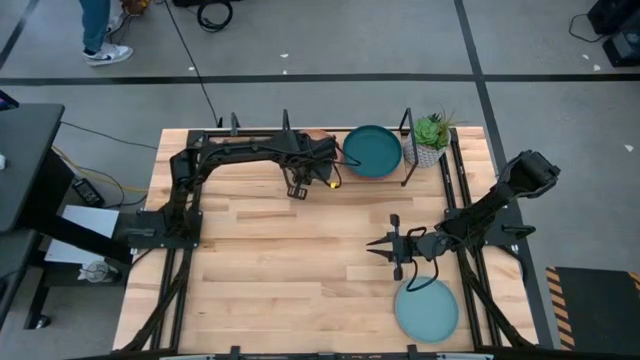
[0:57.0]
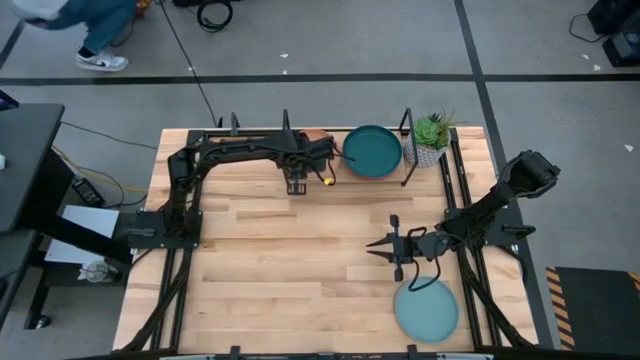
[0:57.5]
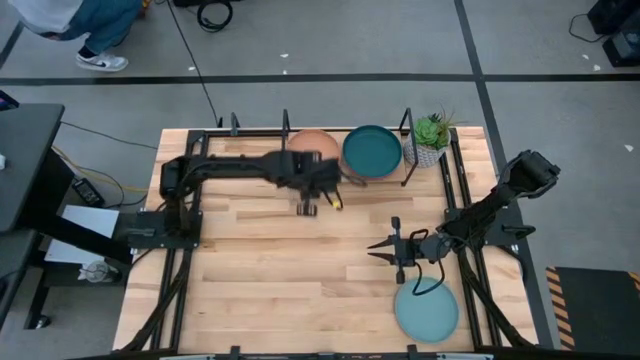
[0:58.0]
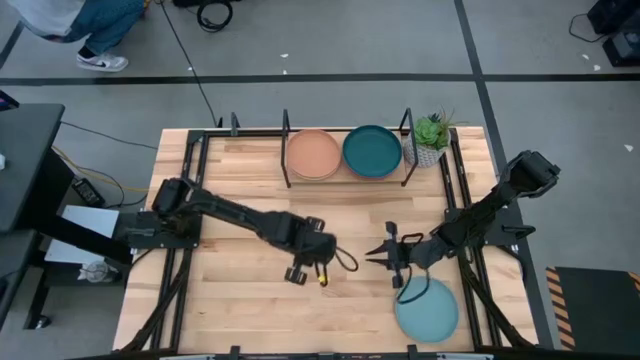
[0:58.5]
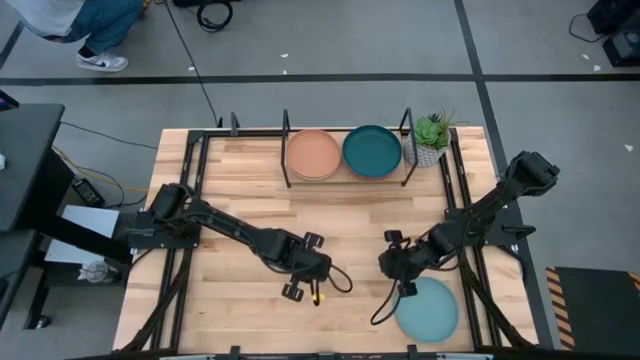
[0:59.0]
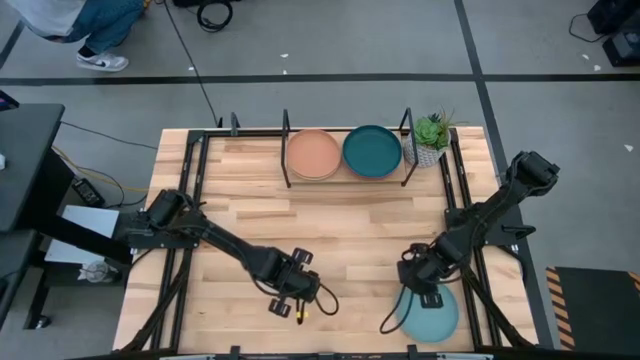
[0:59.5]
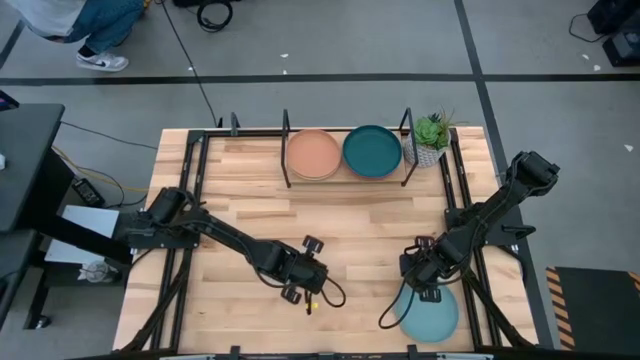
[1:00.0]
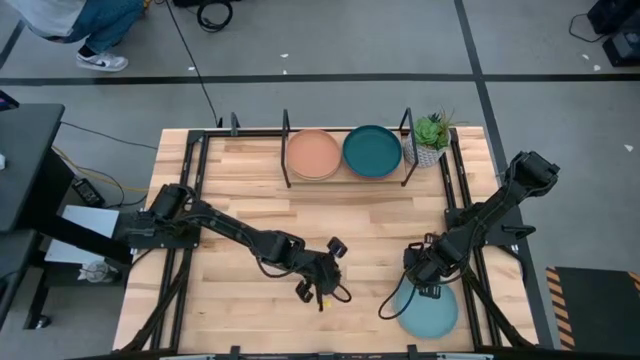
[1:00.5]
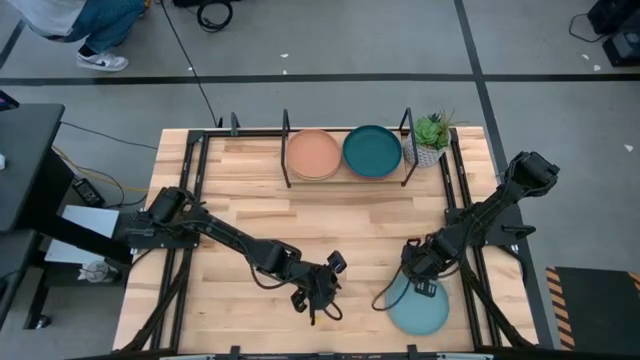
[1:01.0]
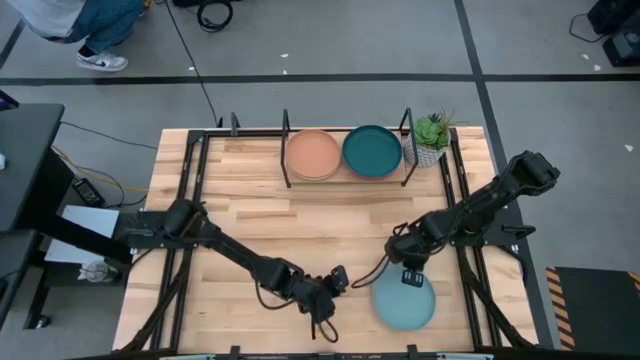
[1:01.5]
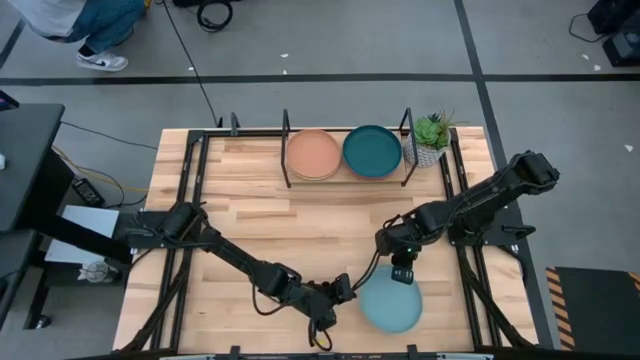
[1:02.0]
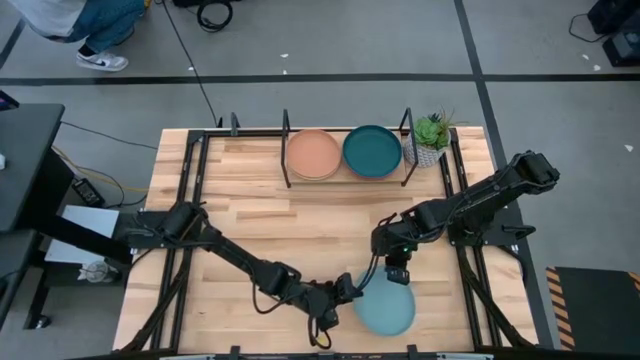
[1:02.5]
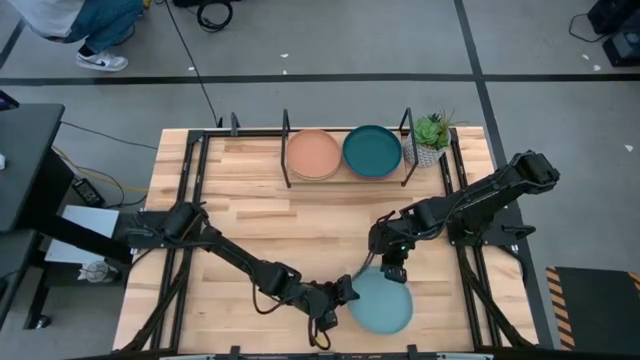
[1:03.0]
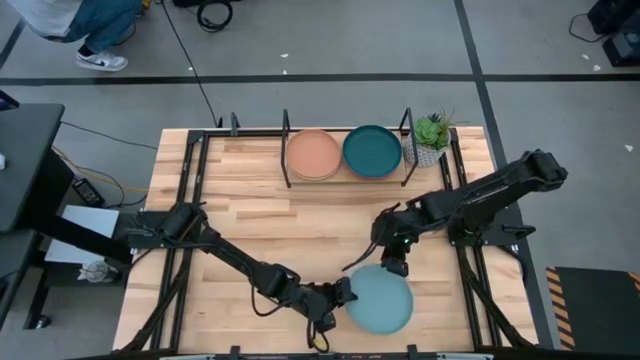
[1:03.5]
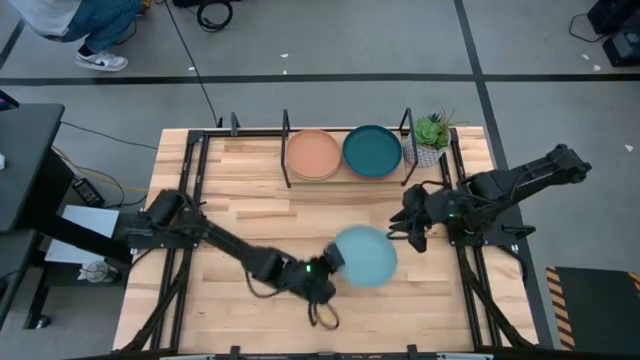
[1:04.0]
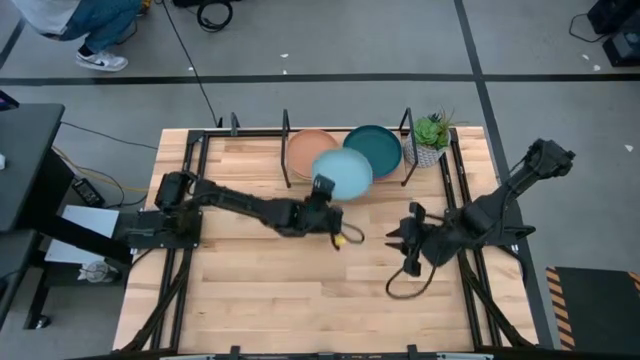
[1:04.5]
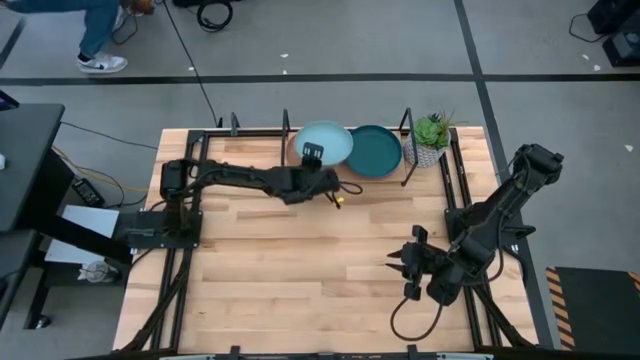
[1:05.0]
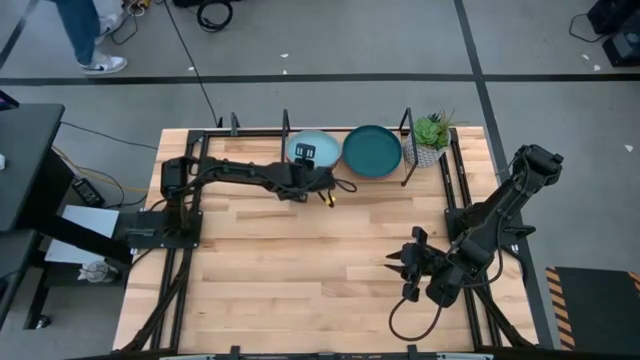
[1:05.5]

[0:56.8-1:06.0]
Task: Place and stack plates onto a shelf
Stack the light blue plate on the brown plate on the shelf

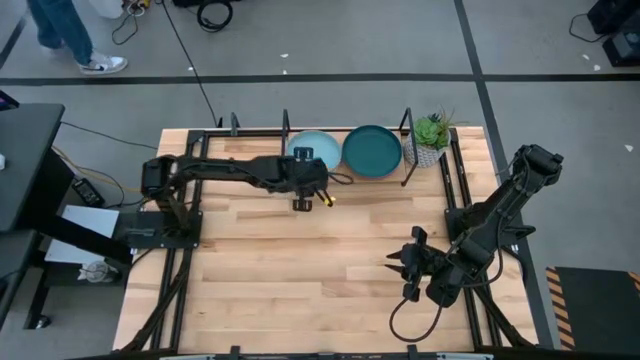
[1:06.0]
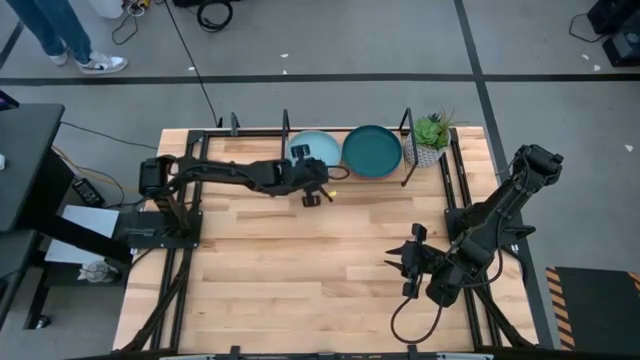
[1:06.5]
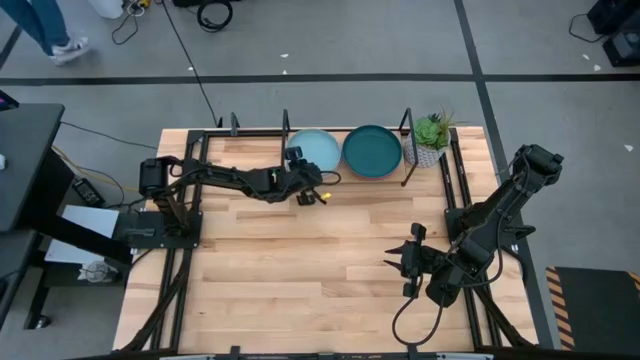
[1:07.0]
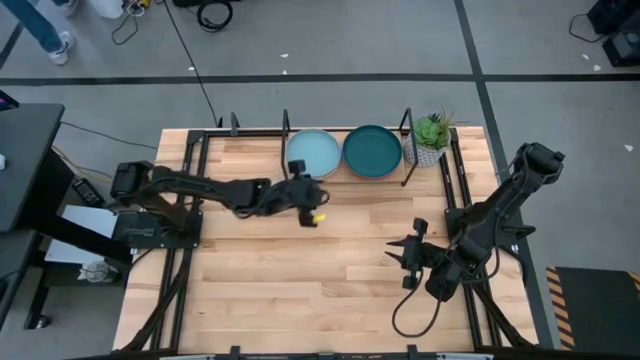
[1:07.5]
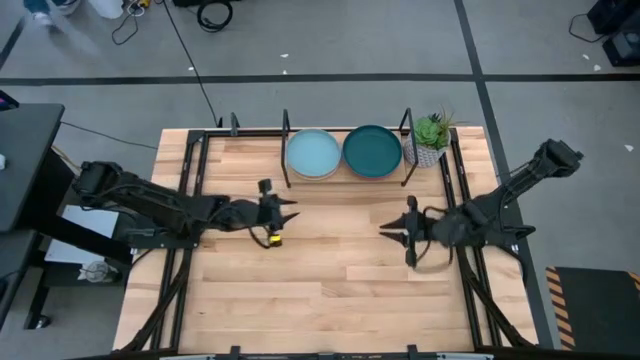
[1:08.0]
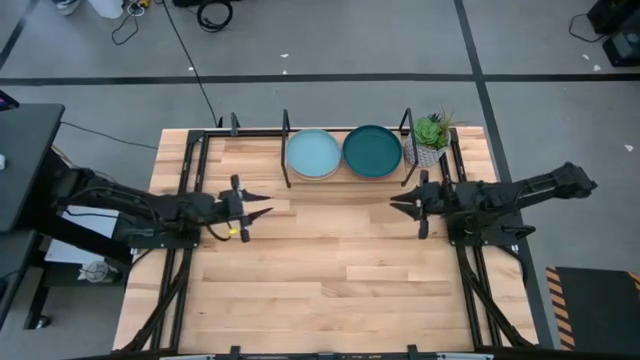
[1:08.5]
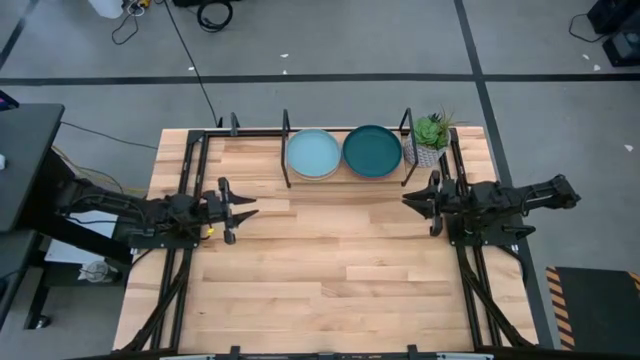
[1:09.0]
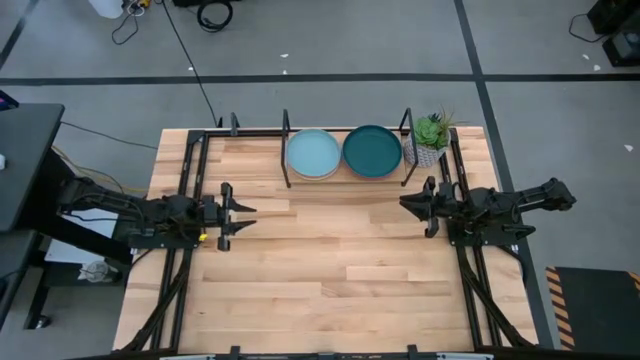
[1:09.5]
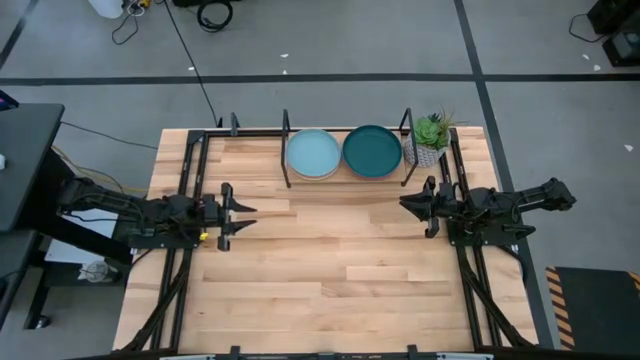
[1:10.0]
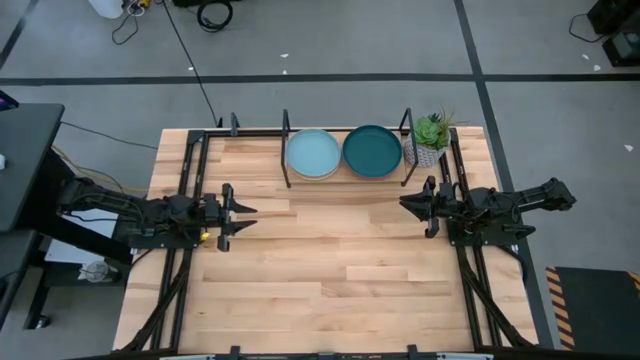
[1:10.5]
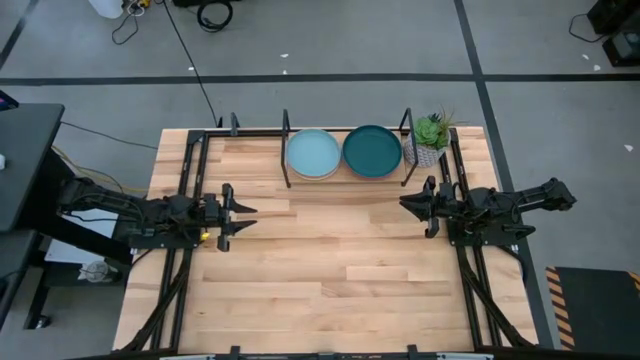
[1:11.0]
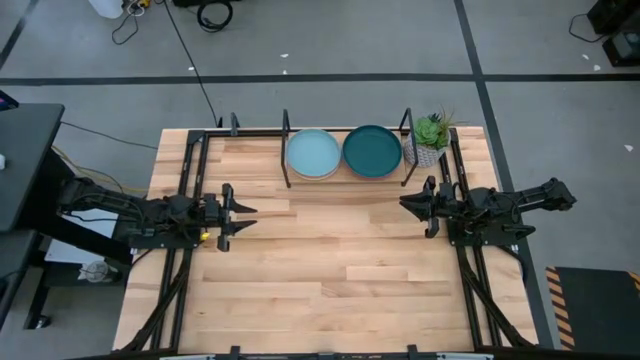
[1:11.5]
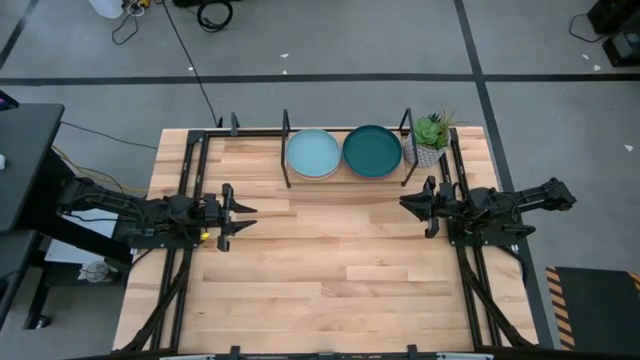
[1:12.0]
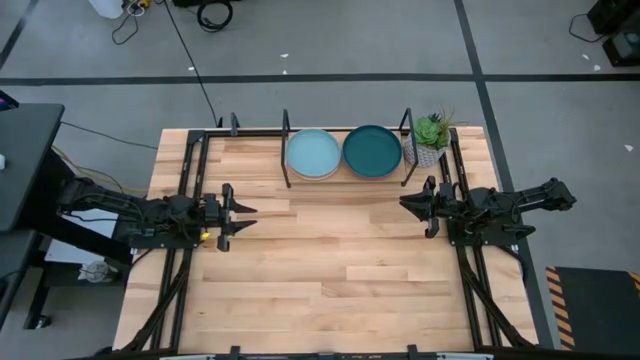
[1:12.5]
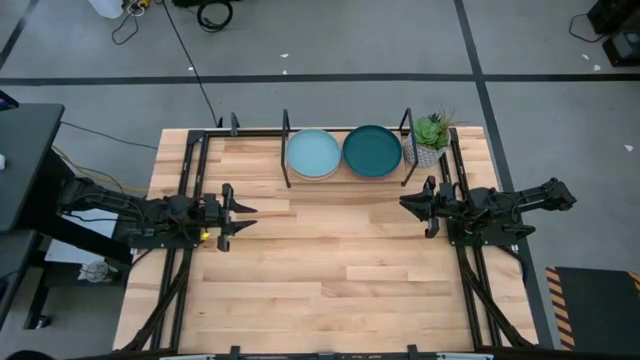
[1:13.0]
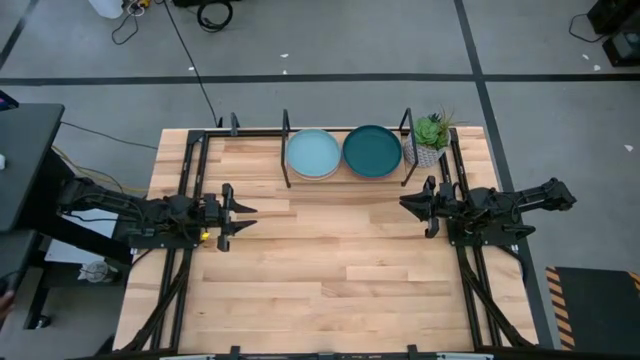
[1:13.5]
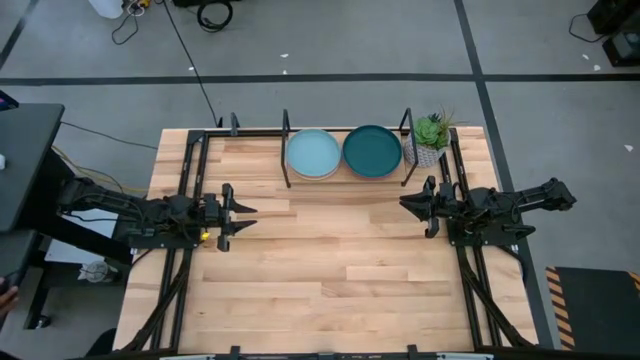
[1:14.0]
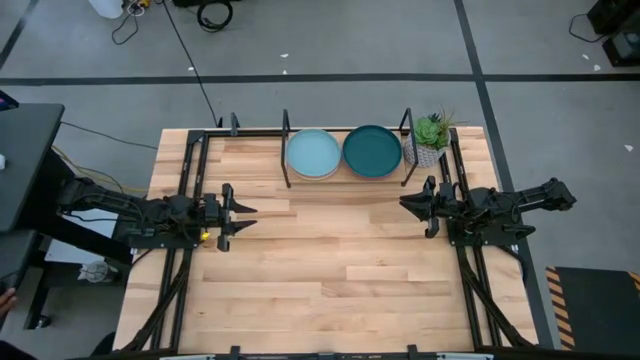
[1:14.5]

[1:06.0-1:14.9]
Return to Home Position

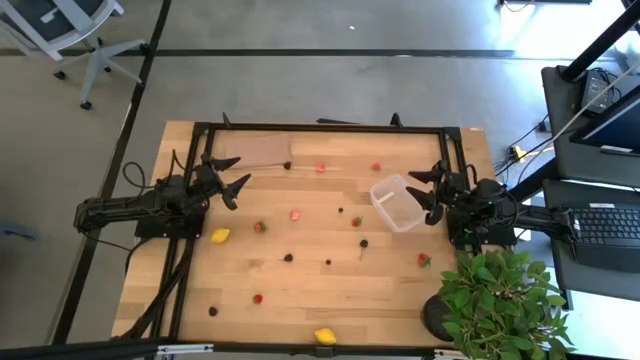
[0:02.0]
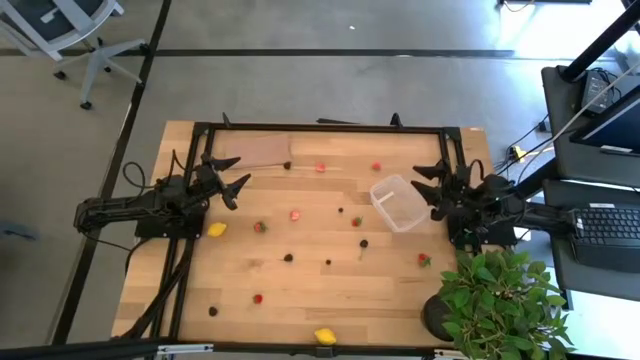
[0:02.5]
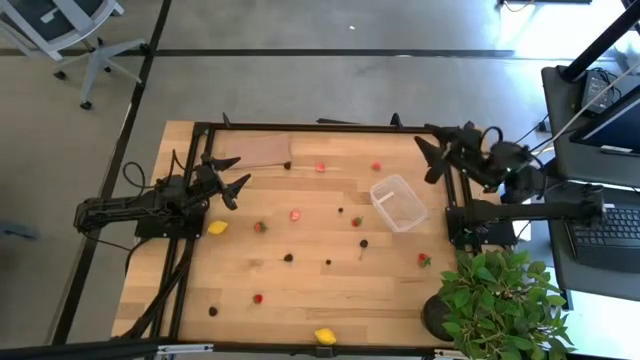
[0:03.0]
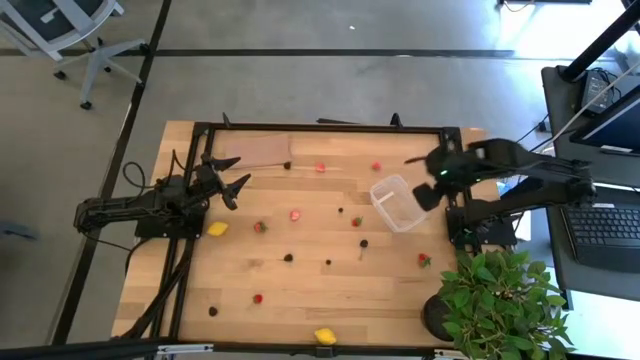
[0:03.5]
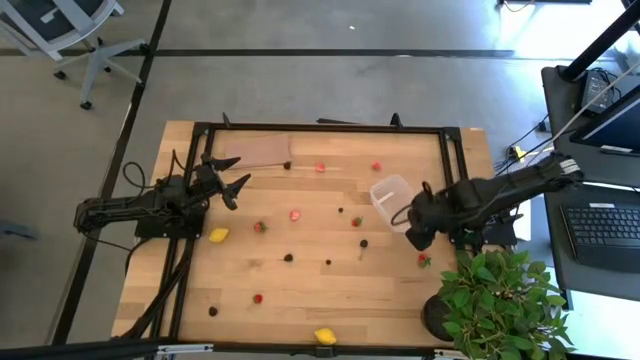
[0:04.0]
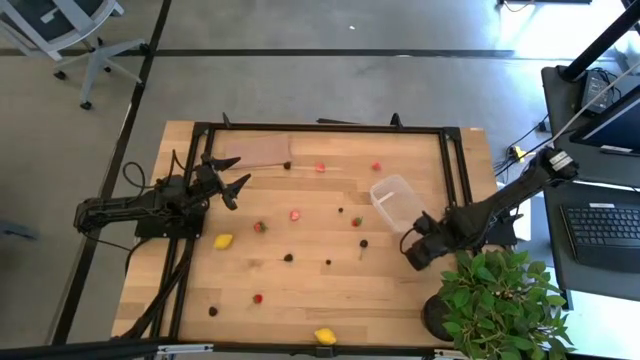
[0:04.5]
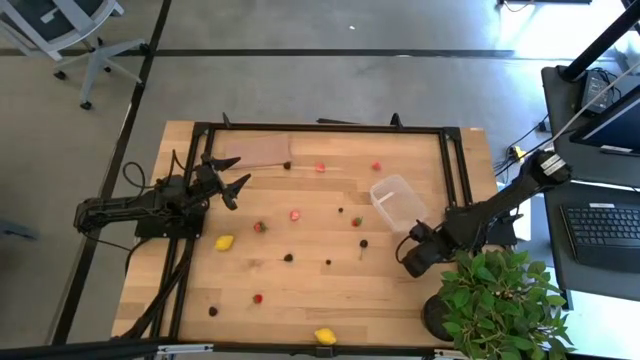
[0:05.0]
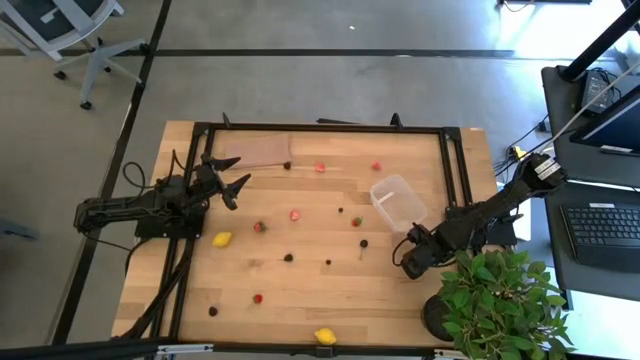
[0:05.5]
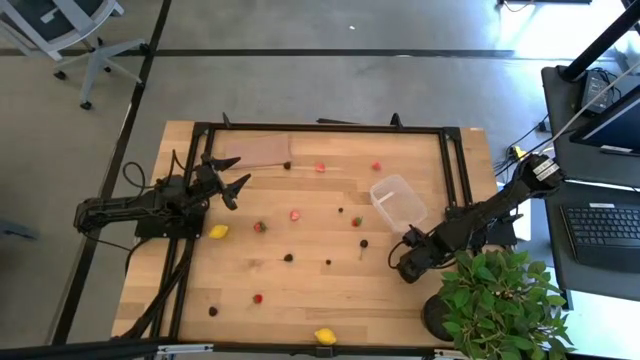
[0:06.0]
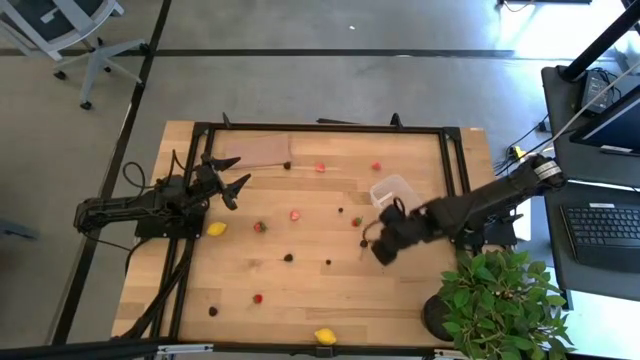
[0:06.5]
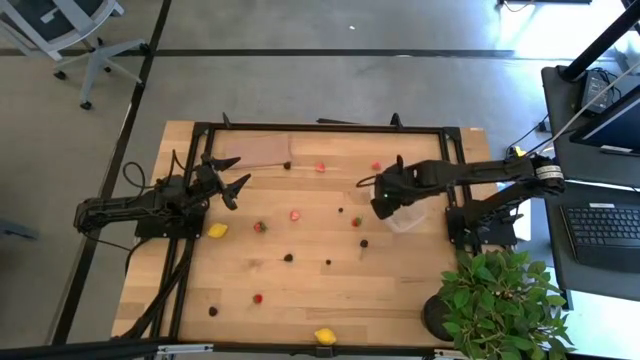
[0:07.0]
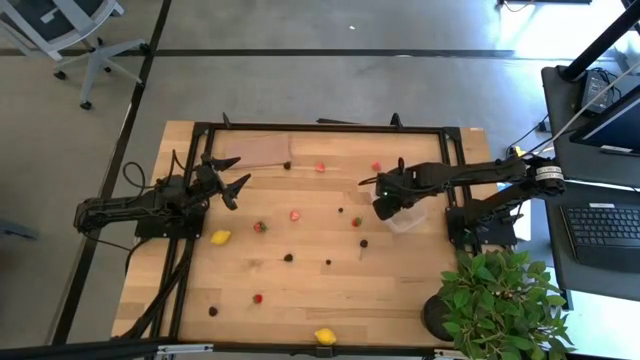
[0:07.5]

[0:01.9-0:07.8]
Task: Pick and placing Produce into tupperware
Put the strawberry into the transparent bin
